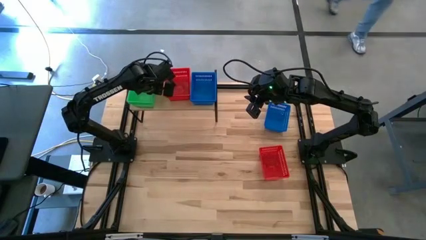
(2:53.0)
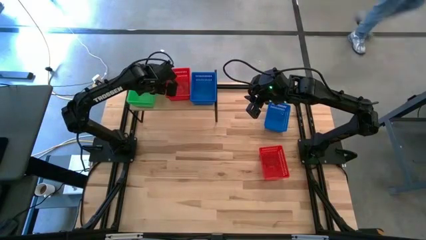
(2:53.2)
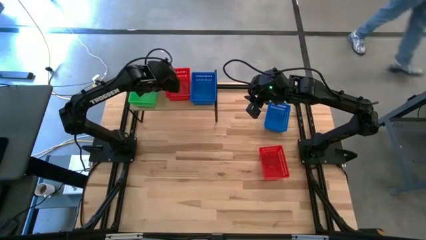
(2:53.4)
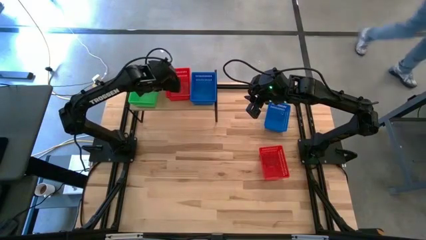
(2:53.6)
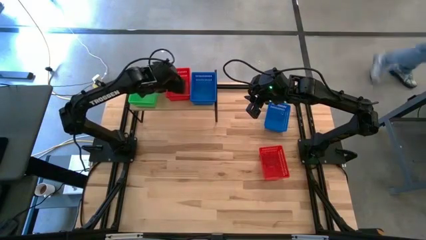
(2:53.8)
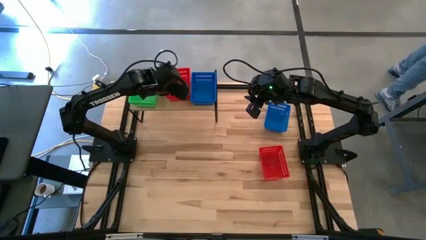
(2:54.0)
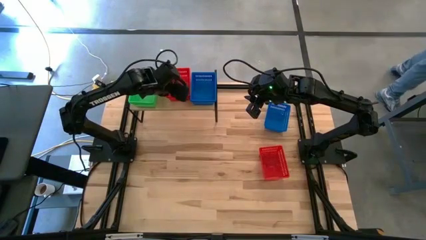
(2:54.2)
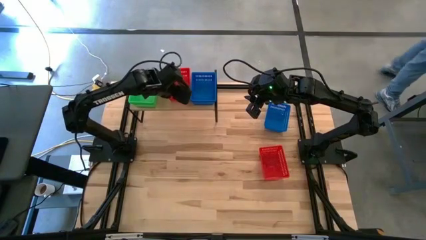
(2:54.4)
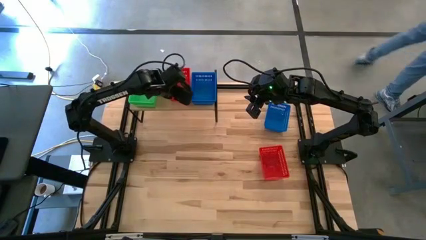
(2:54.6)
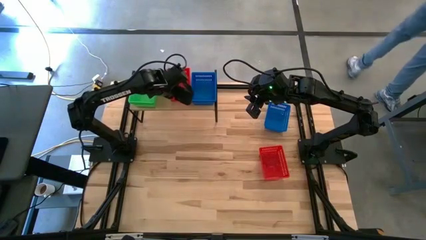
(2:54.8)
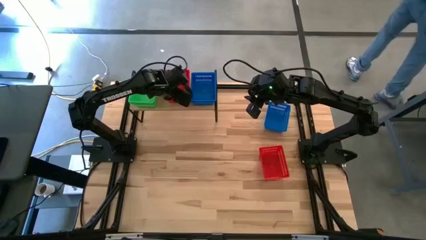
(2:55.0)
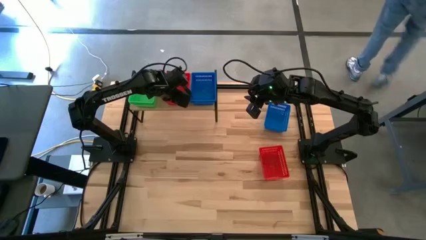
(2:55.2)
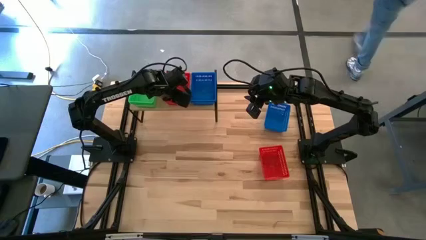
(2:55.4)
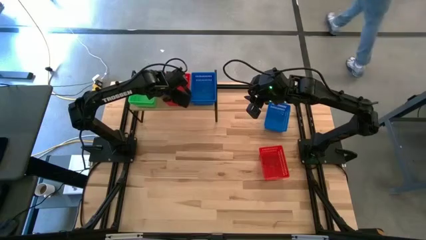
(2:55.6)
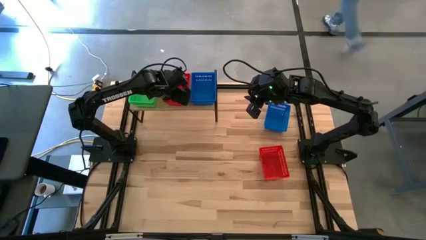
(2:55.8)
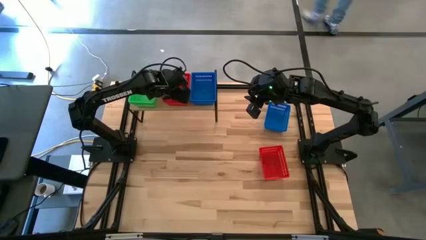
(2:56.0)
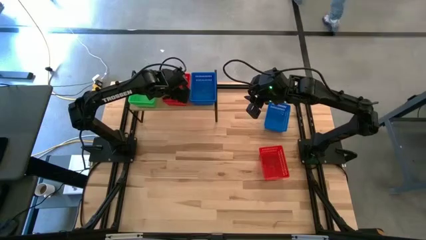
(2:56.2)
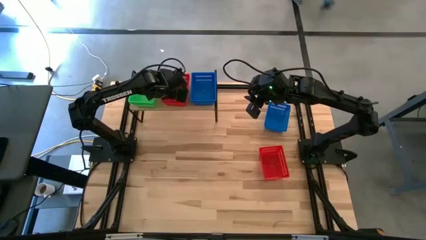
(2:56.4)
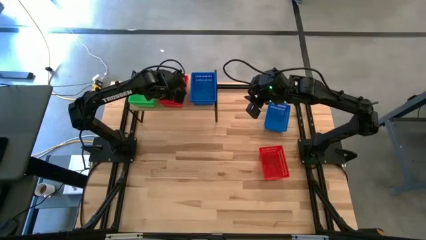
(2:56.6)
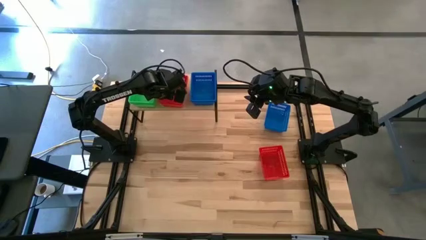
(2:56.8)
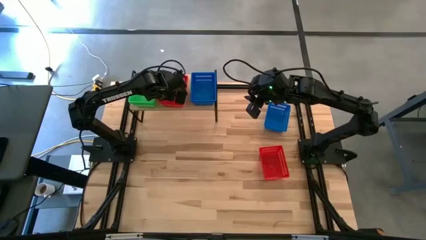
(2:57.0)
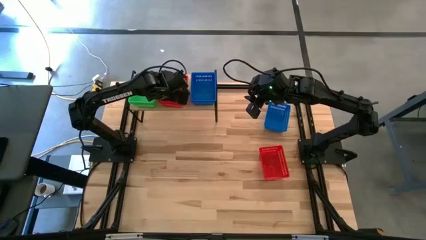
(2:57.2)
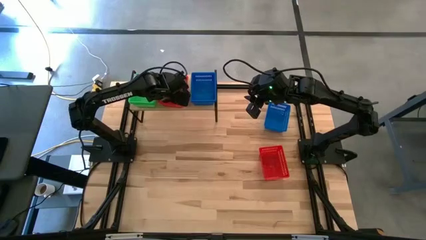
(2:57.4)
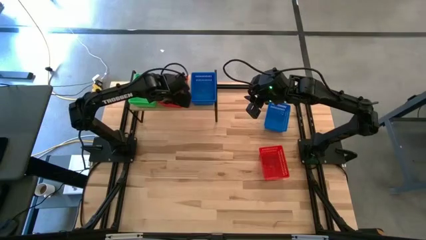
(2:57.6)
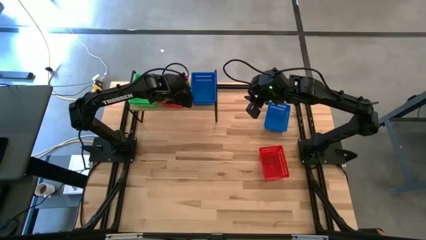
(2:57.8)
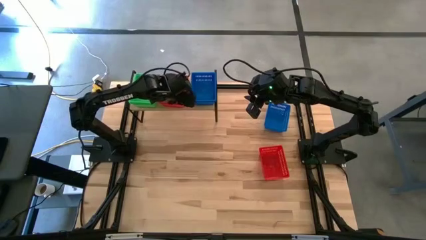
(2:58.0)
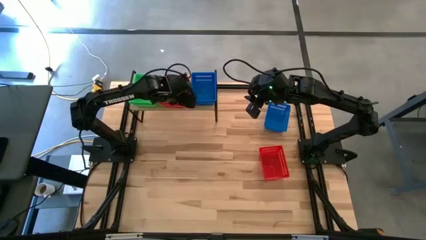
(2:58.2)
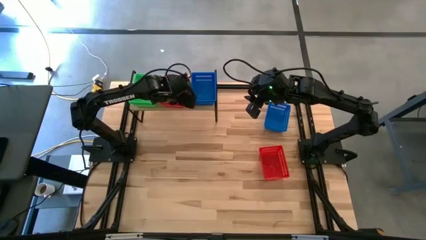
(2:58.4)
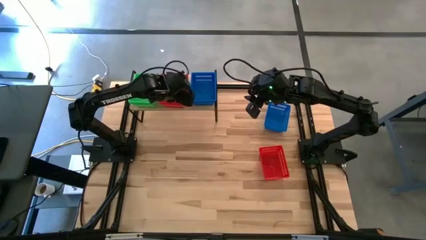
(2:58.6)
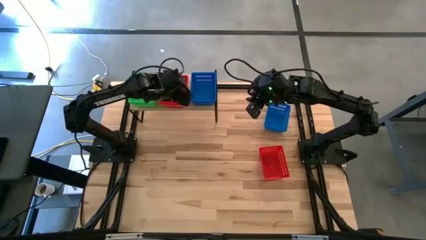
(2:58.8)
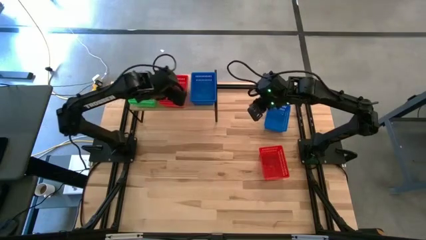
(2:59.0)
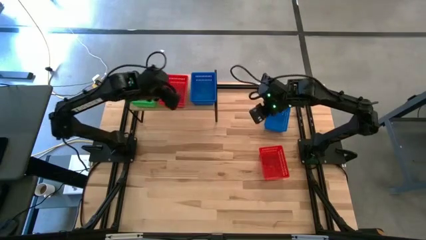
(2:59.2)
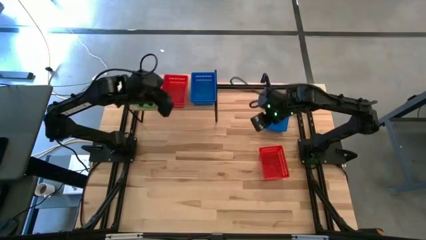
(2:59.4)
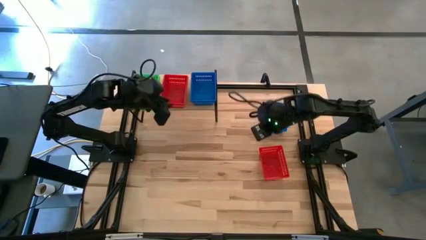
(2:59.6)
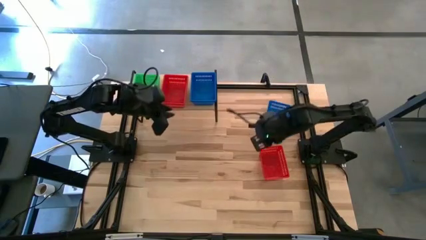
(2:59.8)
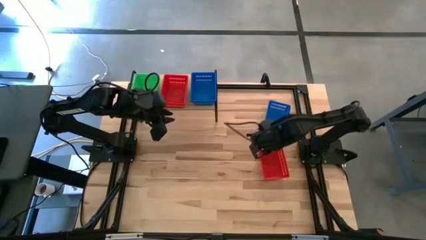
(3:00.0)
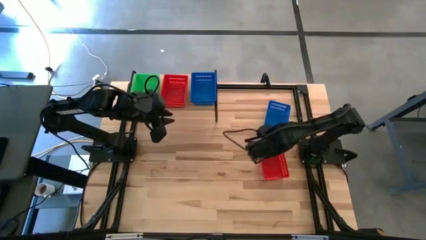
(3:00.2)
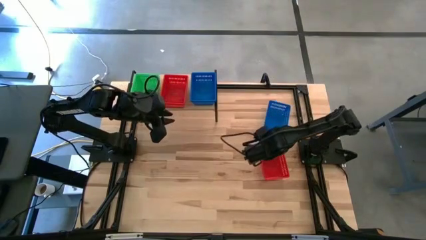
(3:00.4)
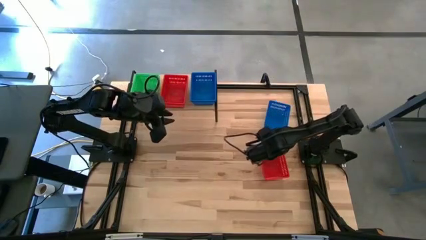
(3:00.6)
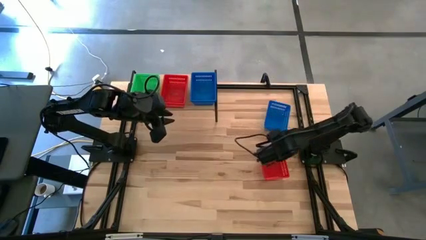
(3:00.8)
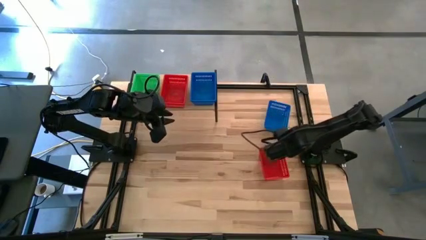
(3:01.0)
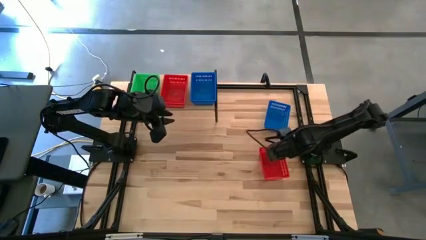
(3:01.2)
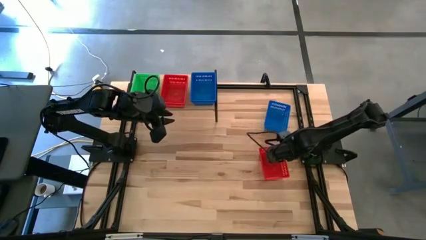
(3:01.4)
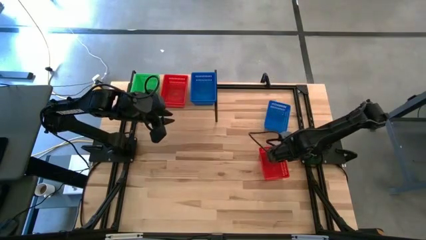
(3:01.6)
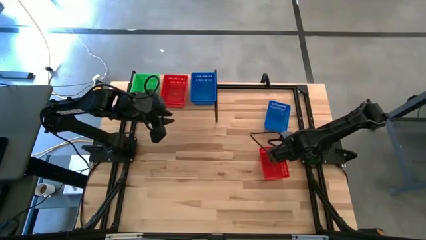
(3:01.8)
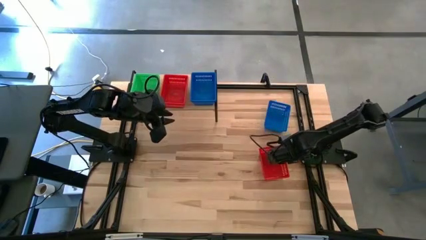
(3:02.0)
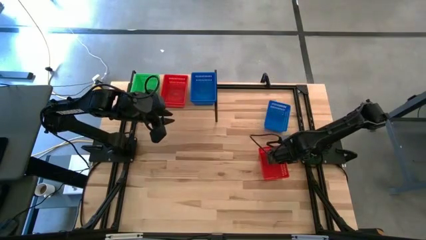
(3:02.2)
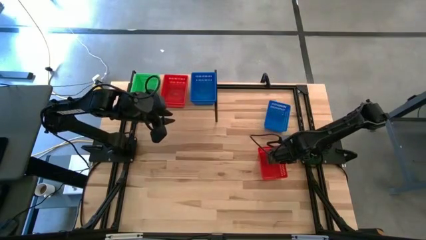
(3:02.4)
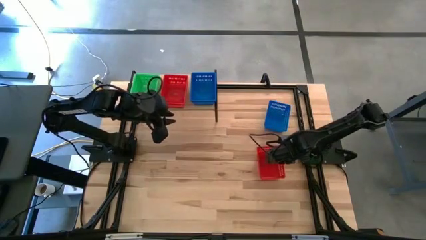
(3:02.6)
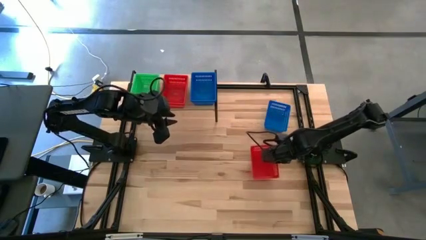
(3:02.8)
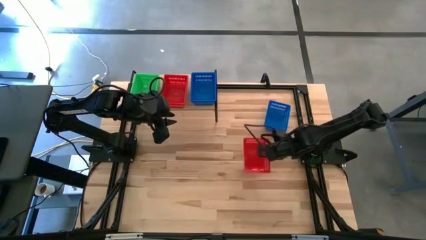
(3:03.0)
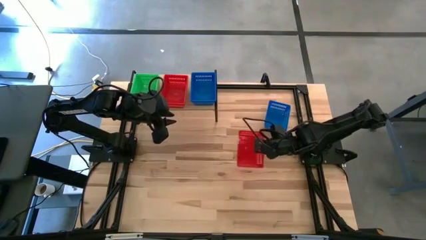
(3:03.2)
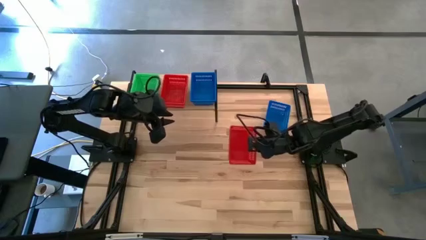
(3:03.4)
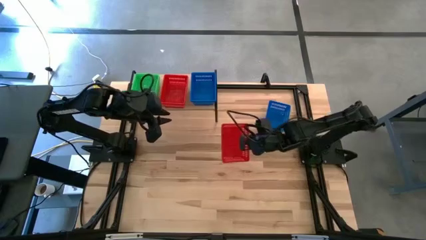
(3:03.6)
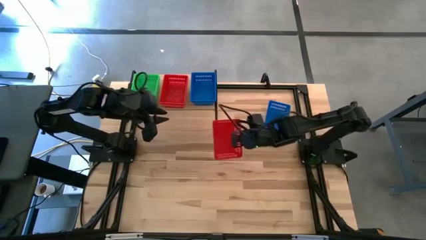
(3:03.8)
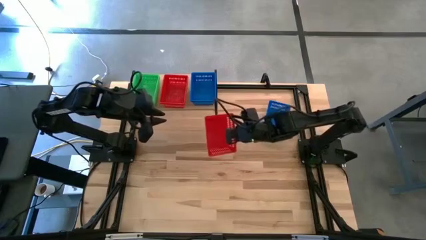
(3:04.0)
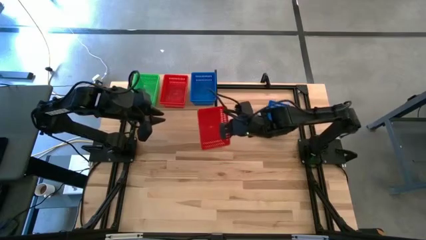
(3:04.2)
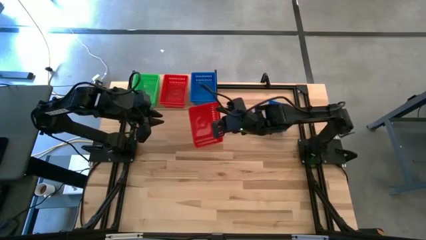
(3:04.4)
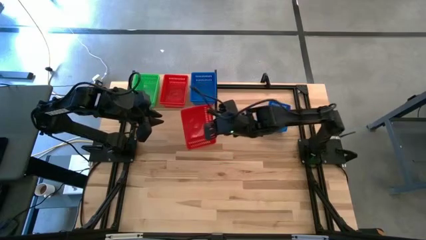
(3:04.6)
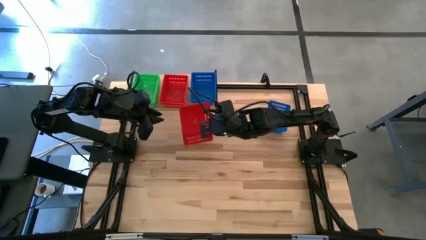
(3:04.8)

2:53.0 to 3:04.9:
Task: Stack baskets on shelf by color
Adjust the red baskets on the shelf
